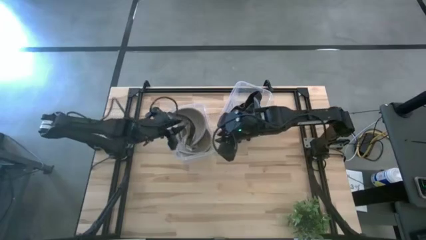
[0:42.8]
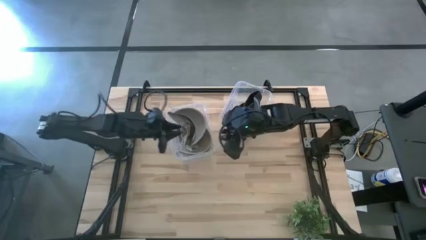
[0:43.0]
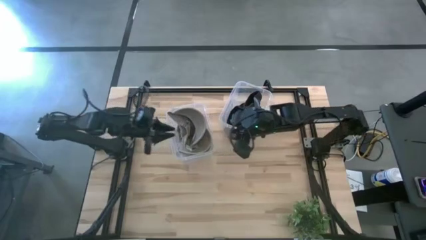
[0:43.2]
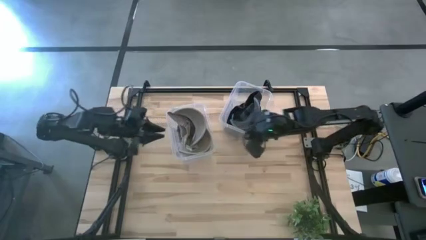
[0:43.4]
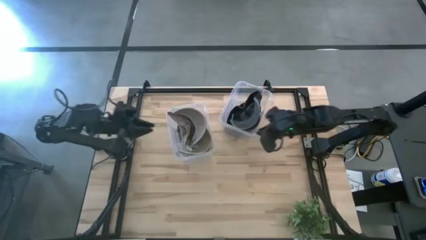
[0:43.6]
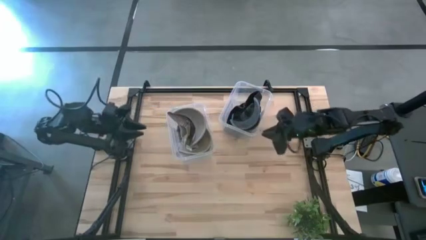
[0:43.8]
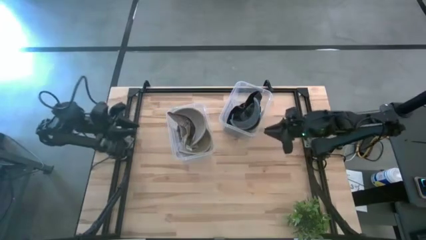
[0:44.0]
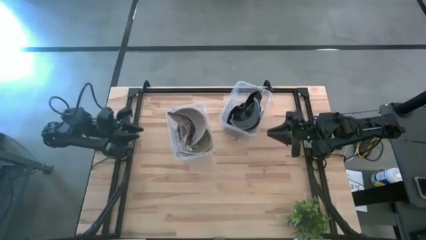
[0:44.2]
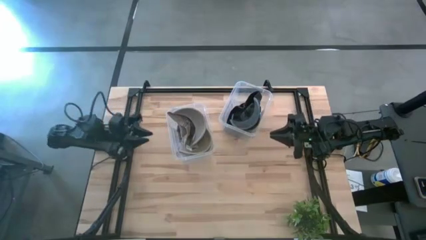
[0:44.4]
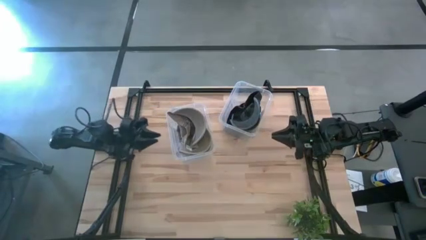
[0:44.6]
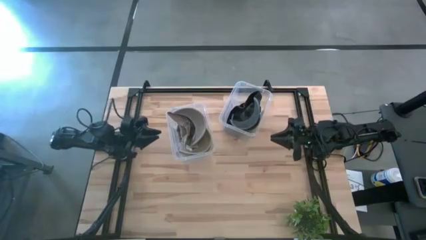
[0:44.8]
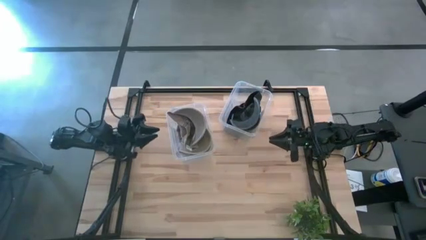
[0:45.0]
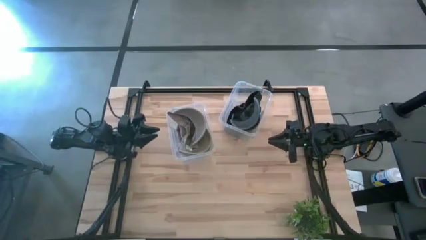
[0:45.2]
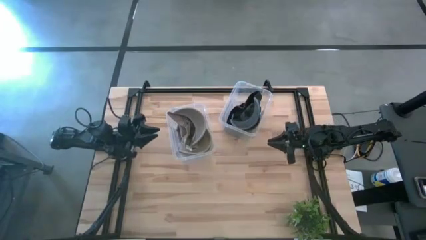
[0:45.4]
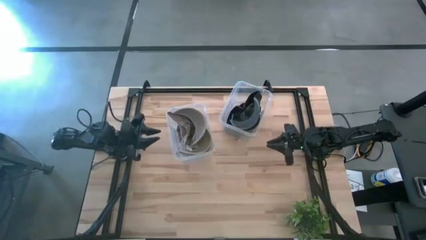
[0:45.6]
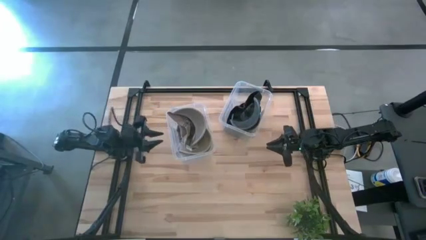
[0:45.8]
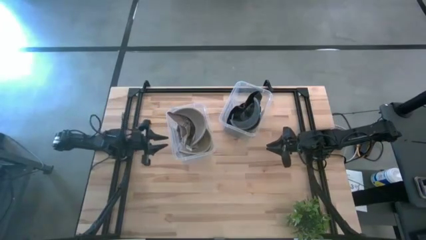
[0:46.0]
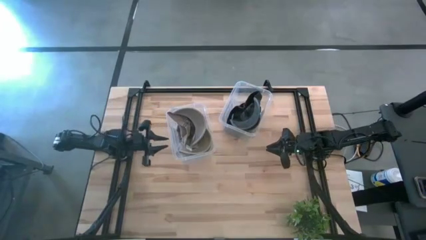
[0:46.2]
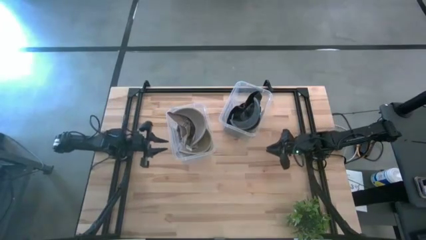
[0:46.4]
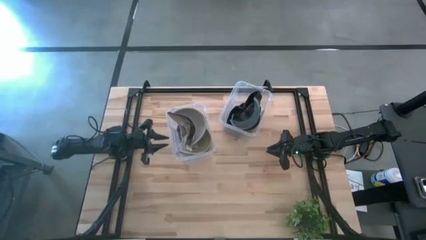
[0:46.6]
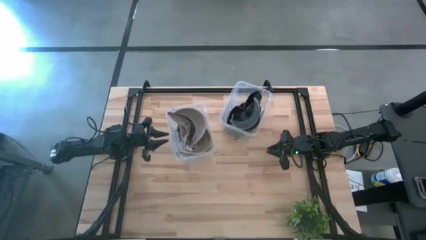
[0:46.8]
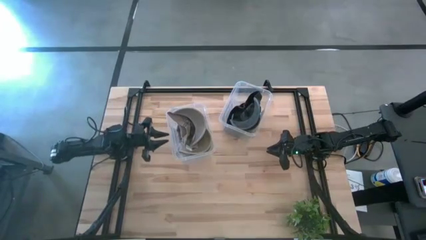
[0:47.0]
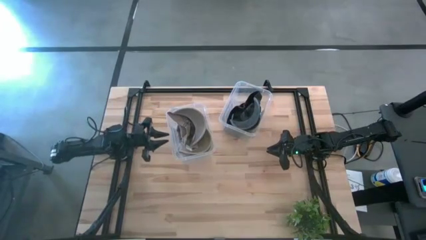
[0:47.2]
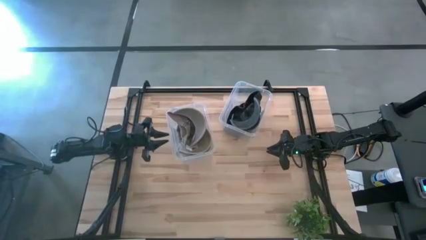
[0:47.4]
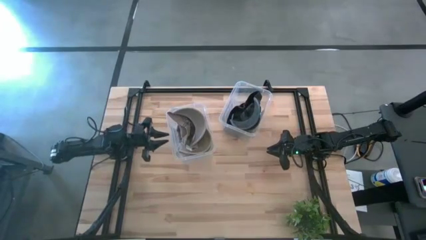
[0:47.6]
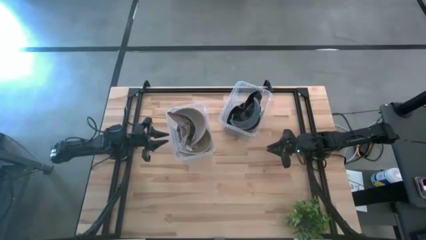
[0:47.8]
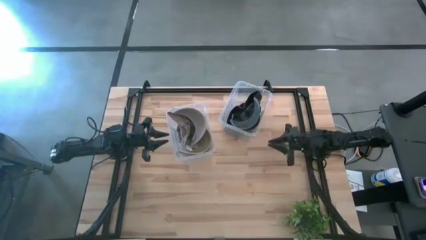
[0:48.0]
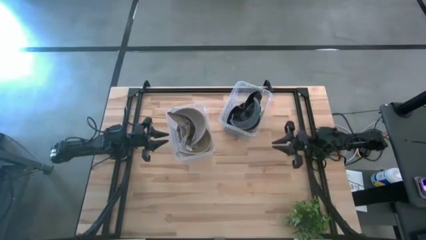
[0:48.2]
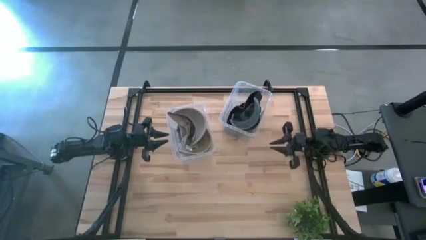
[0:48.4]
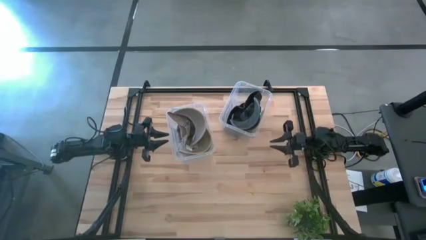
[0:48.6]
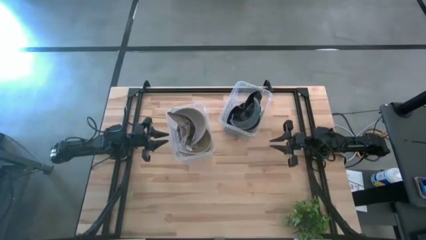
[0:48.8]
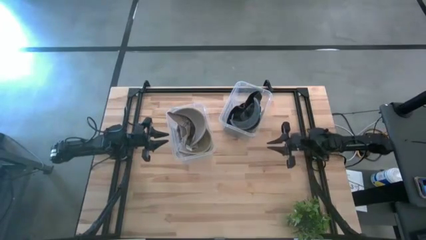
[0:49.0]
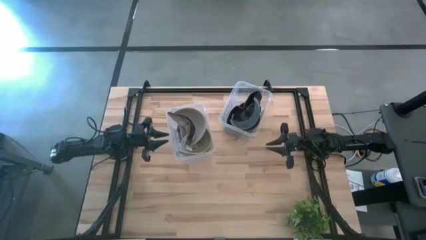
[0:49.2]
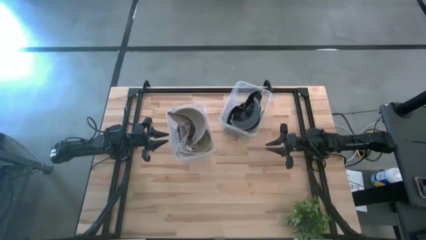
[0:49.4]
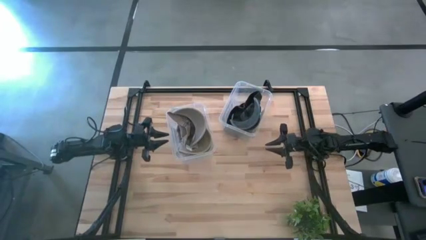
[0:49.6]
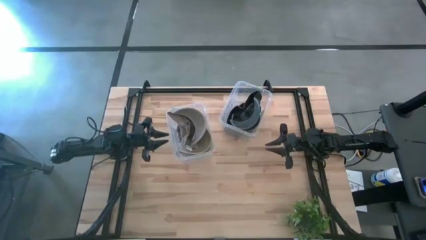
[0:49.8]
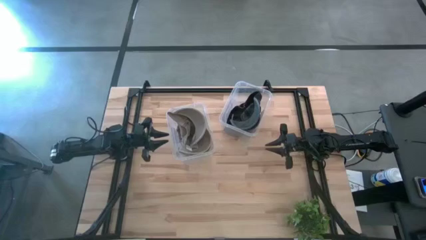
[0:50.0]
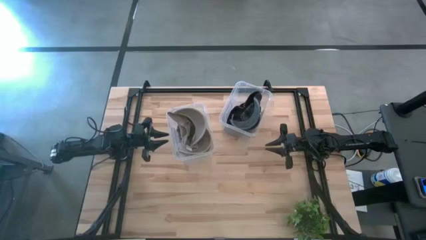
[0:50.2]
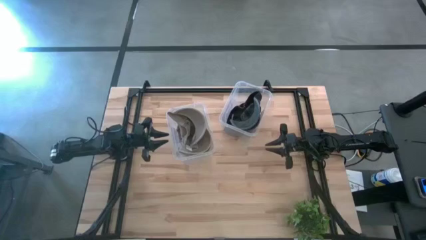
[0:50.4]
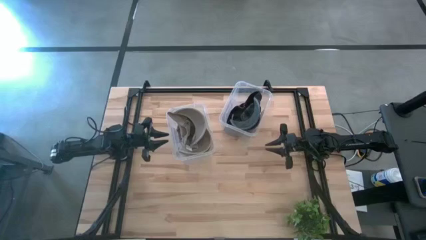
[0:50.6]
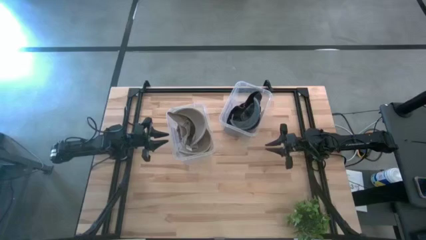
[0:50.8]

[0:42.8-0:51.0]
Task: Pick & Place hat
Return to Home Position

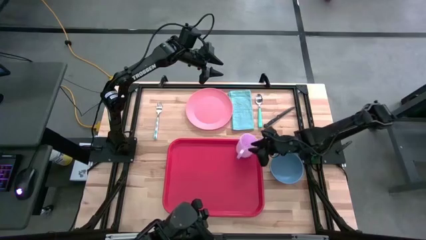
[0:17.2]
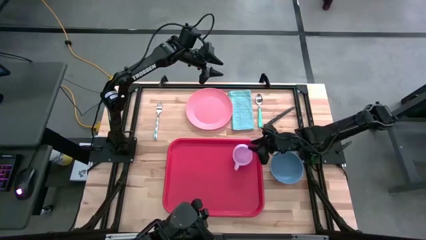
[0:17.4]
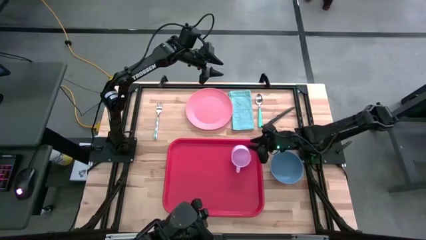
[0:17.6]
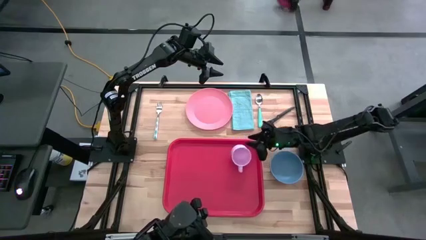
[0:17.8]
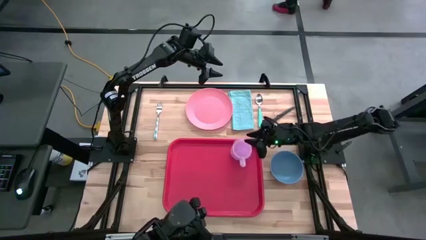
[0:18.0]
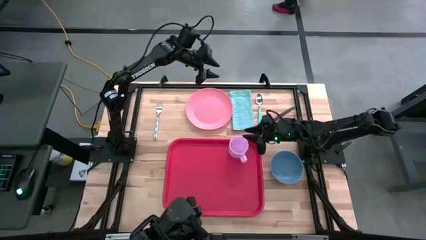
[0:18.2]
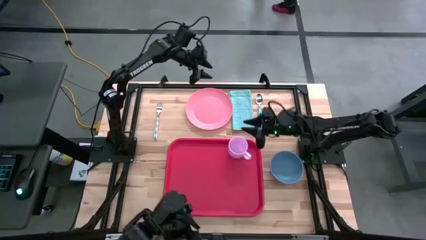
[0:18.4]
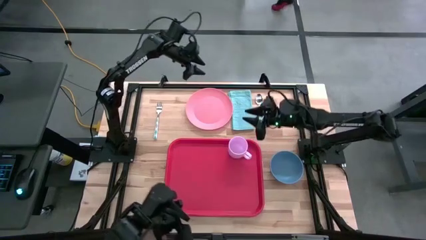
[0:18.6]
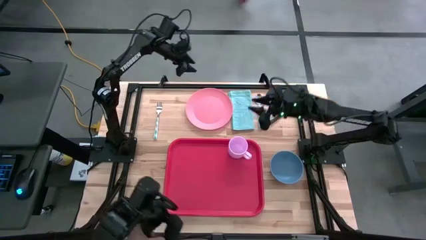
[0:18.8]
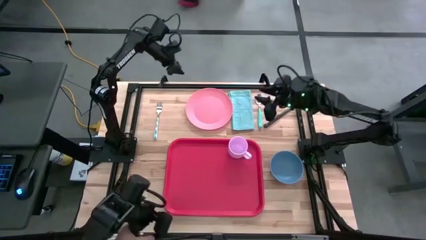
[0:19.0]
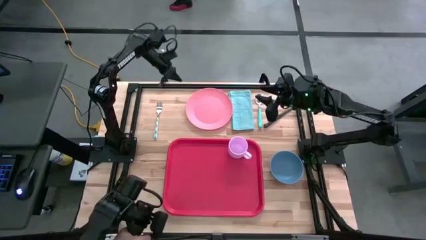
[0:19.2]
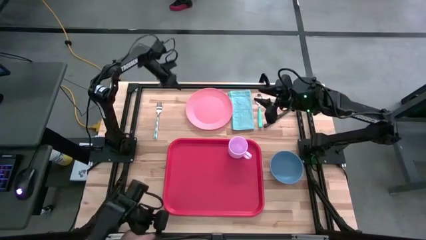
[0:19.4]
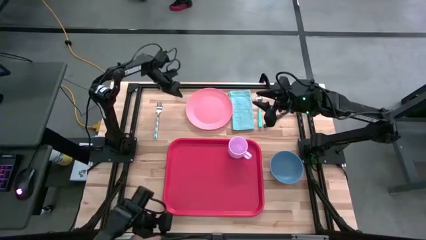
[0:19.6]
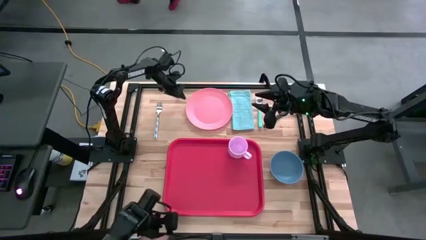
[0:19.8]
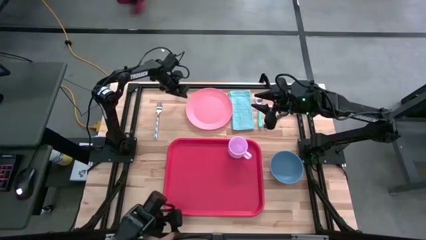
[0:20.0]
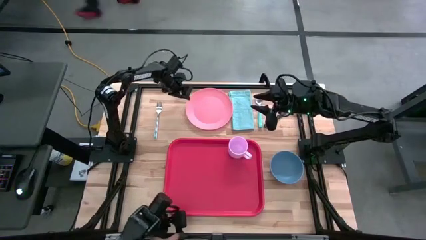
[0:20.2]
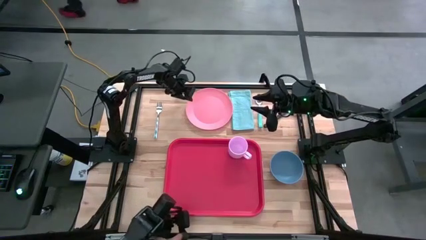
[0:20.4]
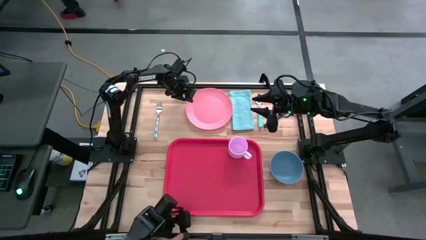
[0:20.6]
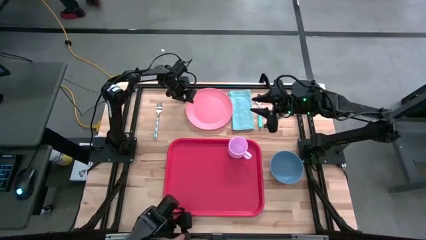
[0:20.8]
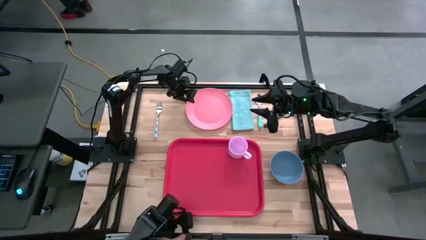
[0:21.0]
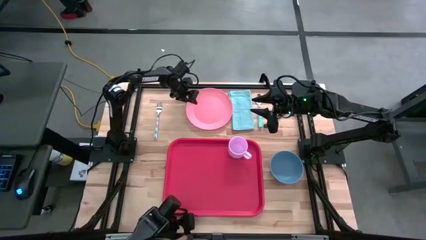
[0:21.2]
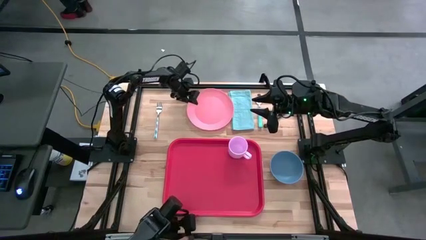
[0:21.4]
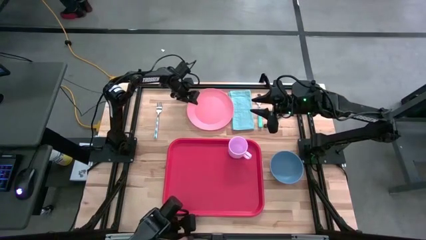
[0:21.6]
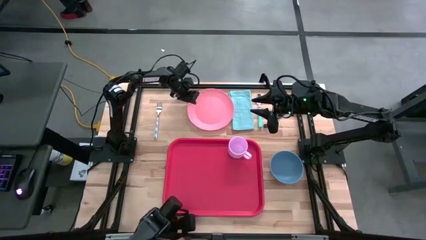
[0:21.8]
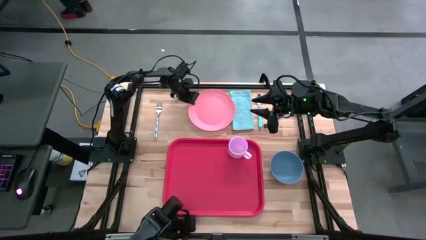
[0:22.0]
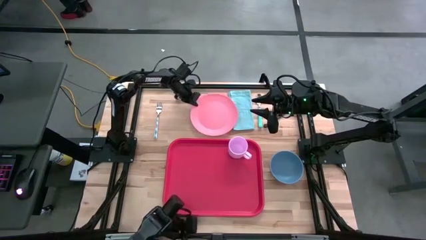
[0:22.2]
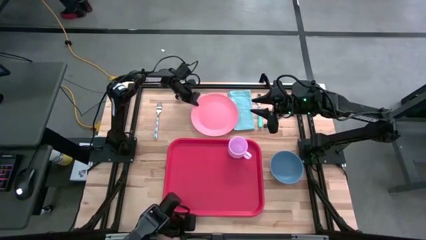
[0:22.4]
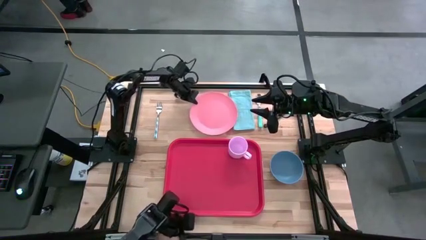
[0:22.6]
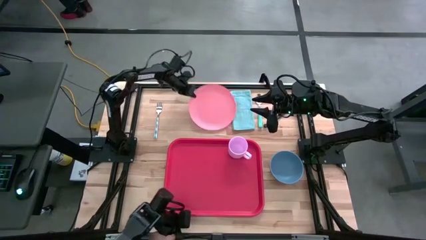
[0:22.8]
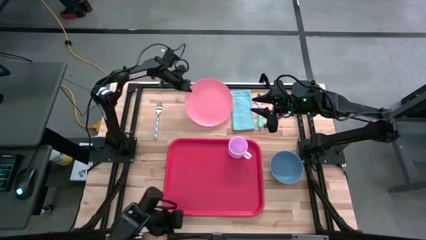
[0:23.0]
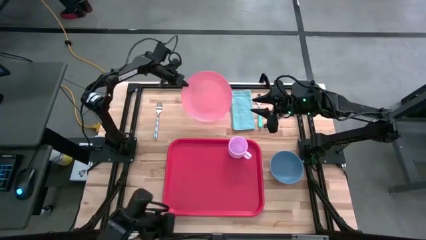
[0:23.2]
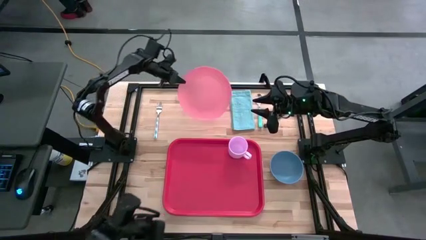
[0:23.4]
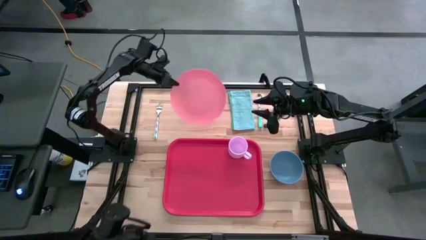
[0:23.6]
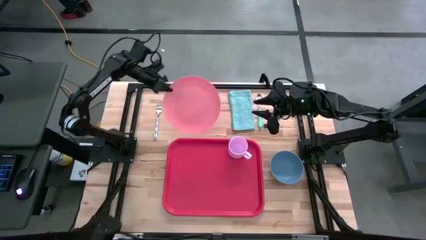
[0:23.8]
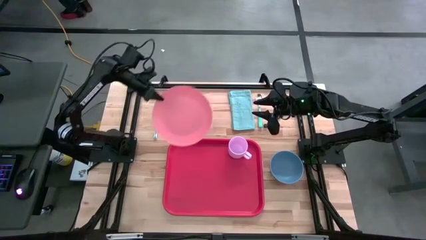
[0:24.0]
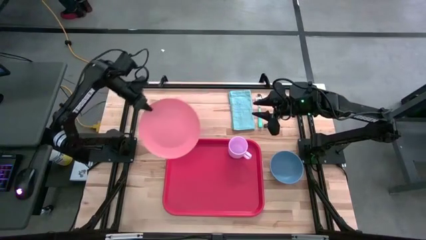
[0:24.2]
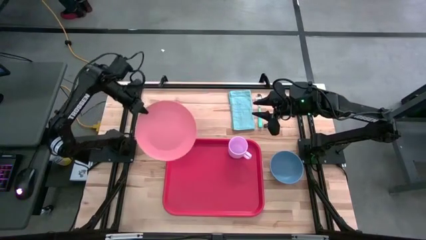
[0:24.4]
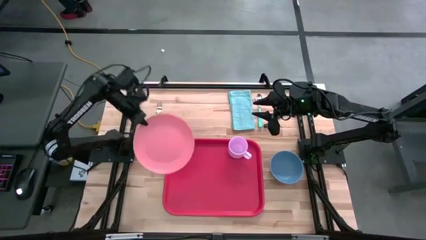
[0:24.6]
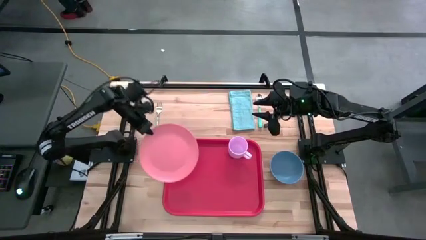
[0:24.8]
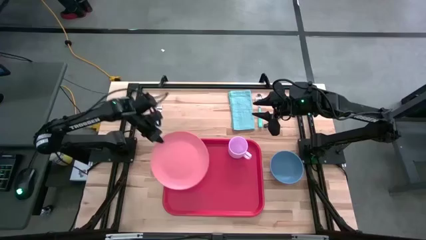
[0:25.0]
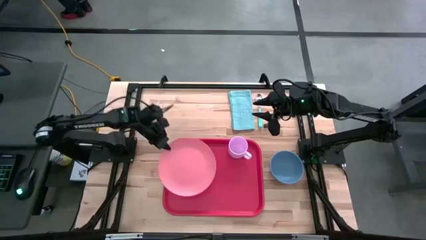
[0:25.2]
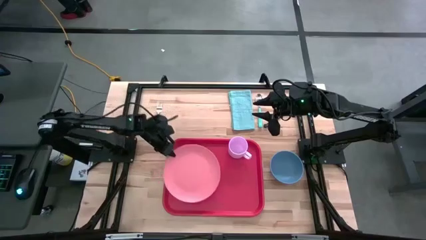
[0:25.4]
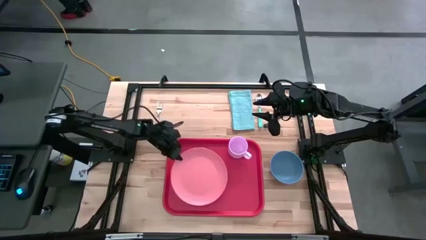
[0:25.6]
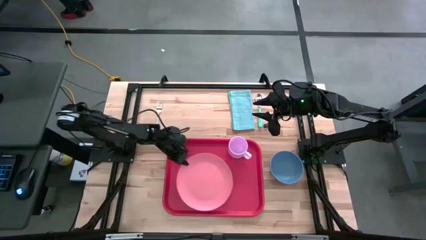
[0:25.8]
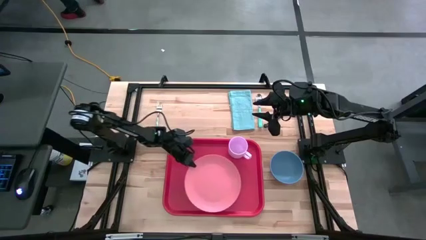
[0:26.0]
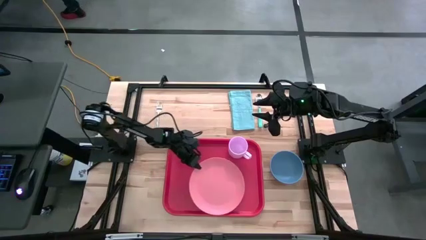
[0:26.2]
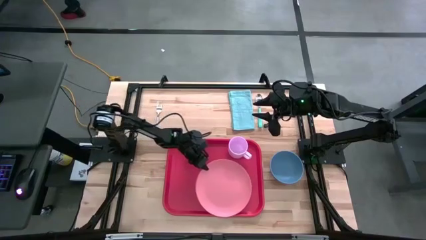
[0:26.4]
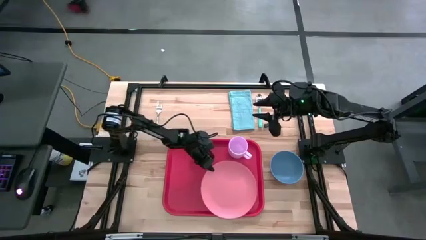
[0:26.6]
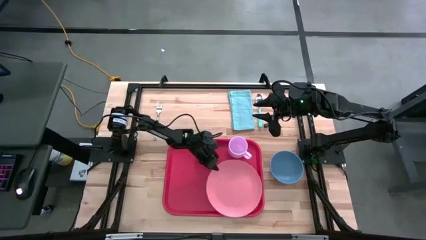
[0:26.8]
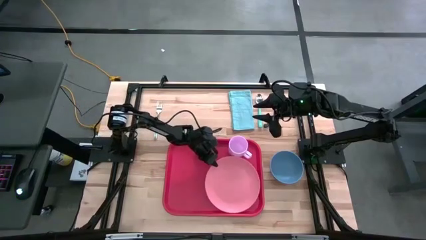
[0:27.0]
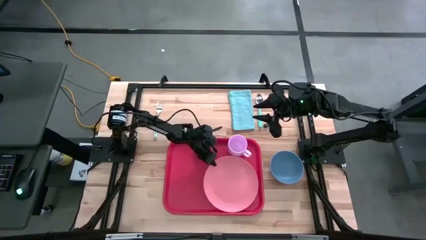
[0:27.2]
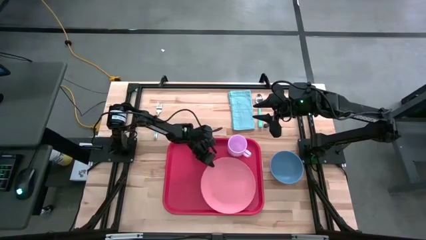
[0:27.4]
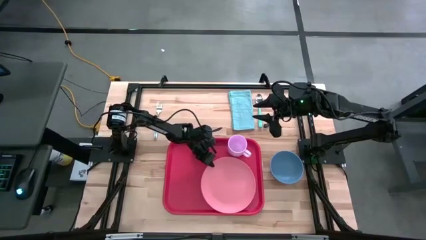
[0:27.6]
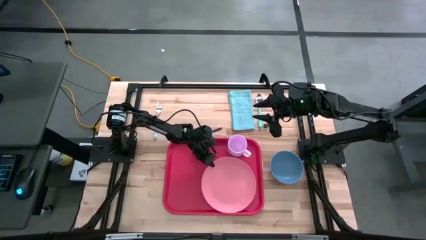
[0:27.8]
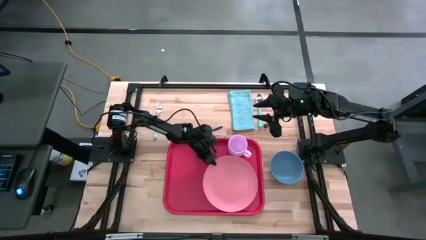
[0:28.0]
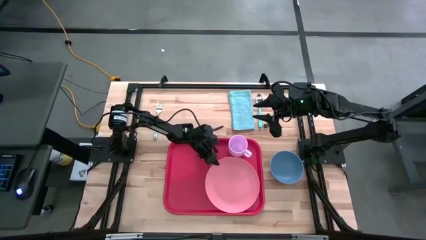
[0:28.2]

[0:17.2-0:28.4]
Task: Set up tray
Put the pink plate on the red serving tray below the pink mug
